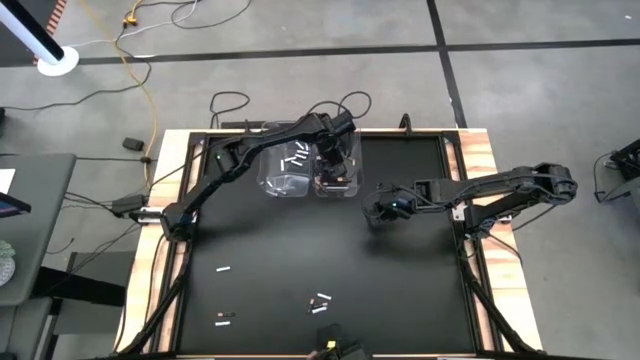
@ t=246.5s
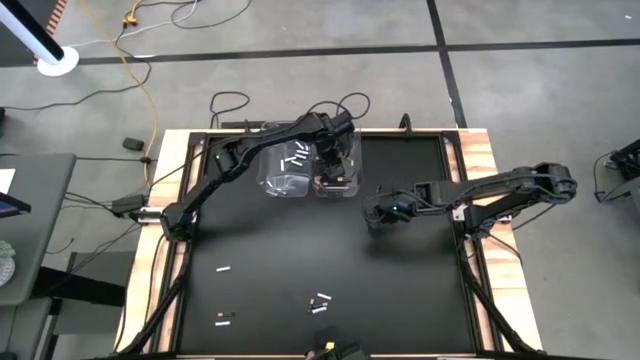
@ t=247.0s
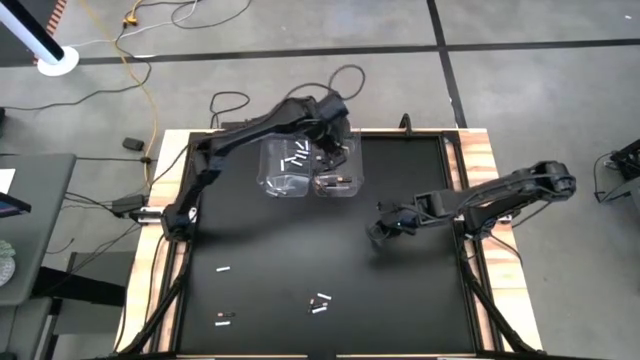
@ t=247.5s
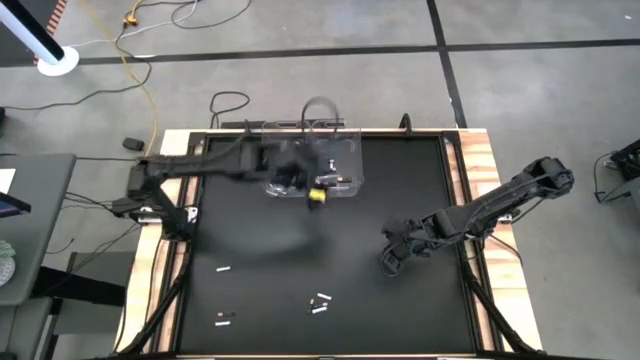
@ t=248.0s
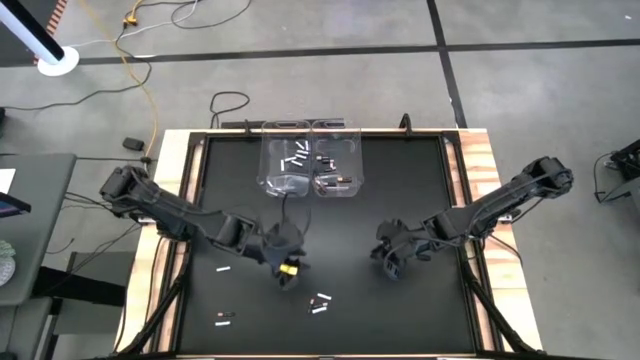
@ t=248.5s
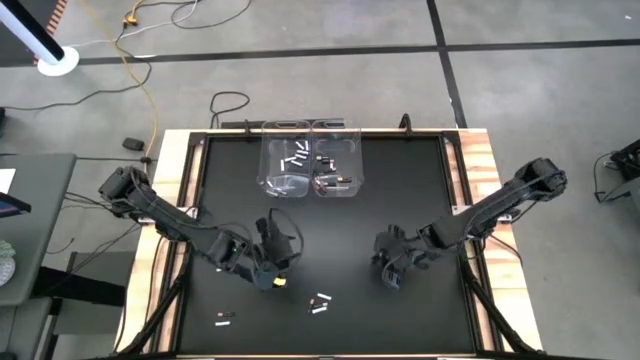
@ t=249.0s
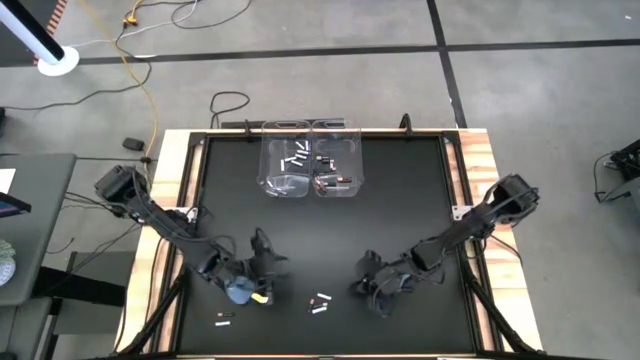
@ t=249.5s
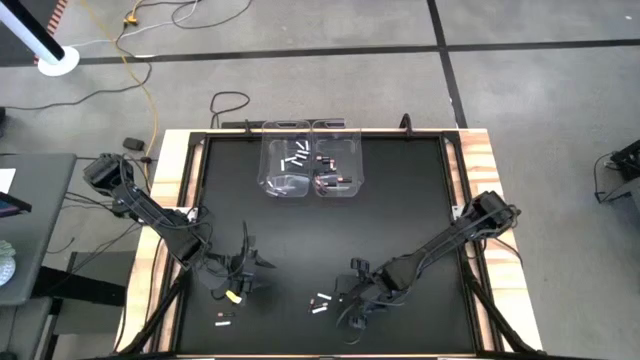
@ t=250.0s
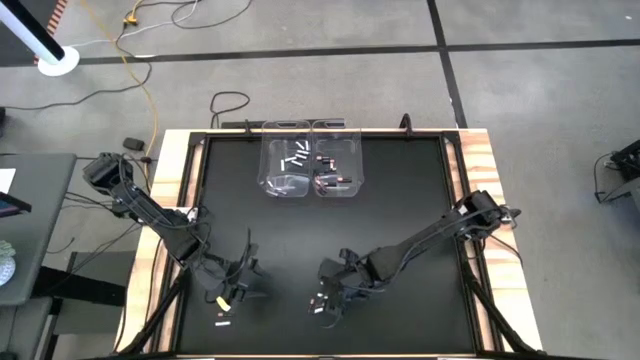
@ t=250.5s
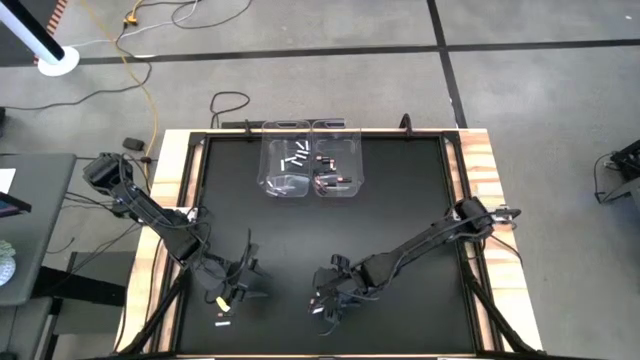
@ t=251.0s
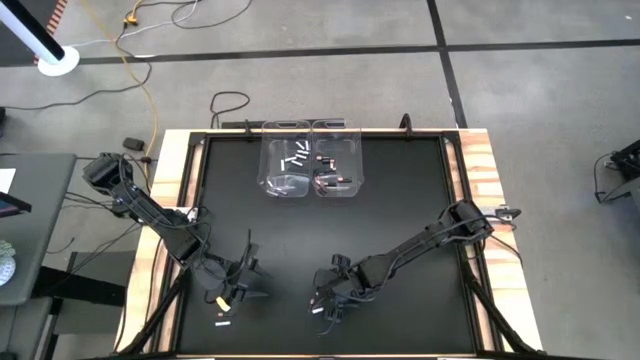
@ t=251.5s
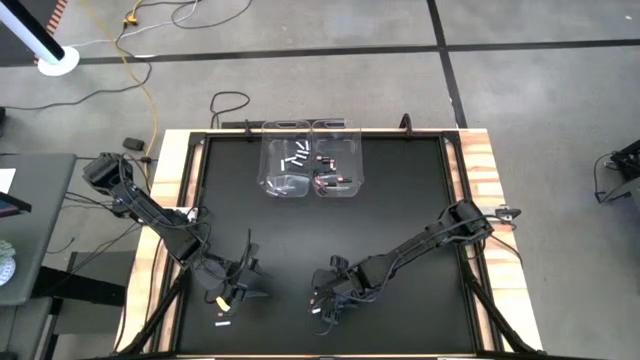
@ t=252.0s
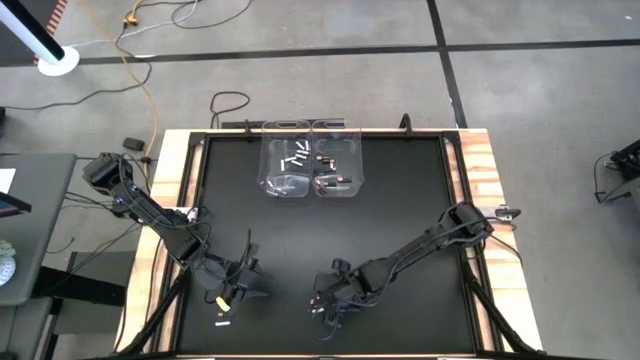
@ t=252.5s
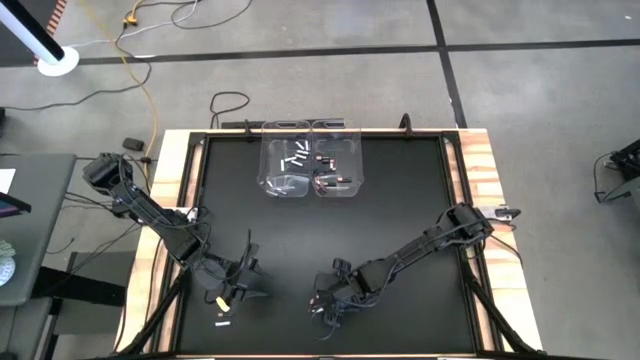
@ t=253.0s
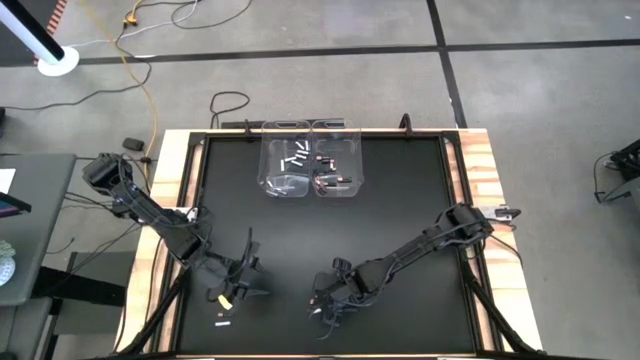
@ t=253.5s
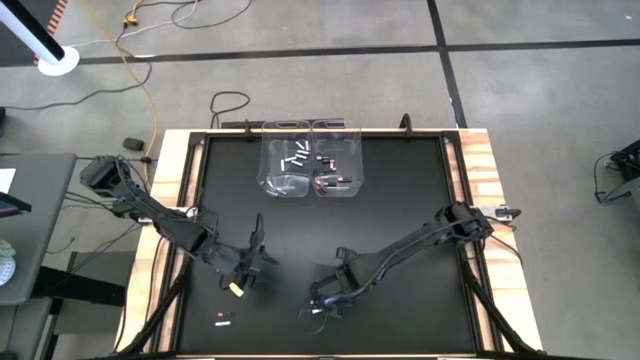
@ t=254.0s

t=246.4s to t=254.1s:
Task: Sort batteries
Put the white battery into the left transparent bin

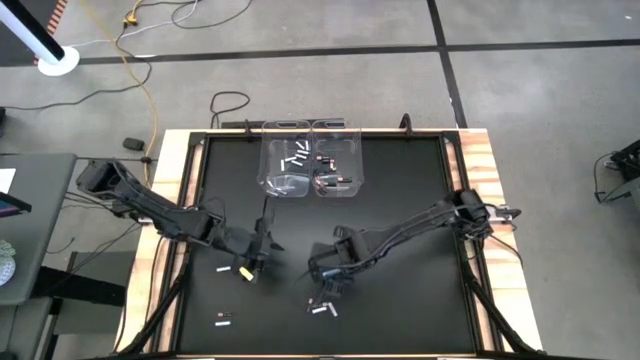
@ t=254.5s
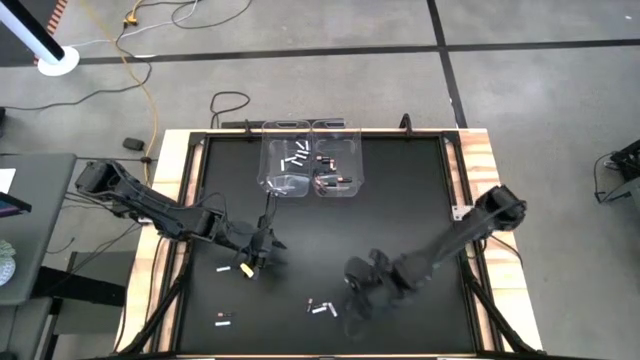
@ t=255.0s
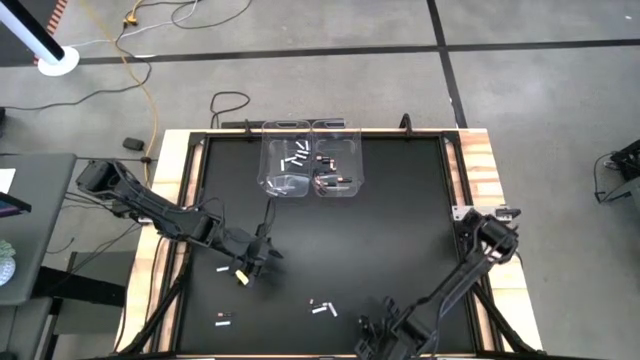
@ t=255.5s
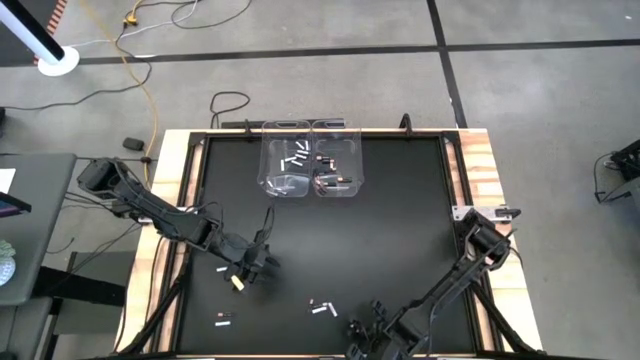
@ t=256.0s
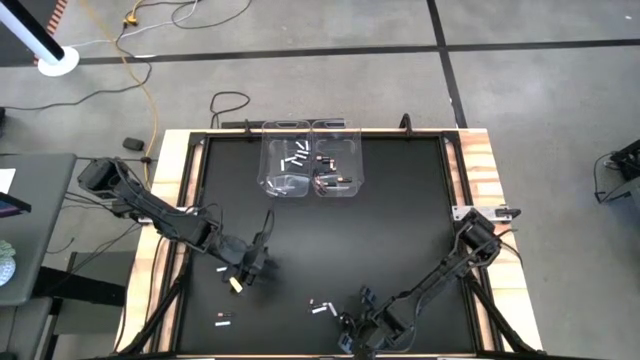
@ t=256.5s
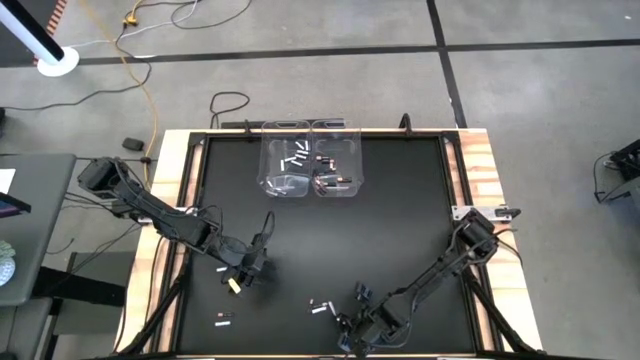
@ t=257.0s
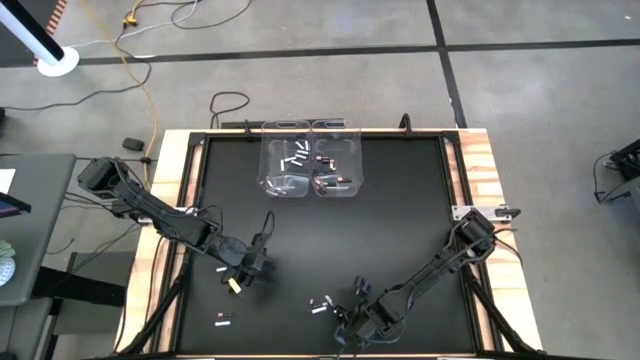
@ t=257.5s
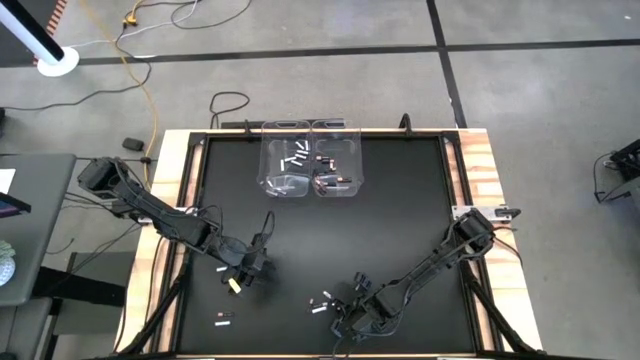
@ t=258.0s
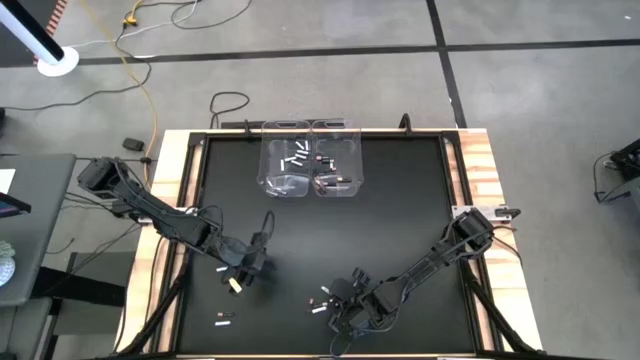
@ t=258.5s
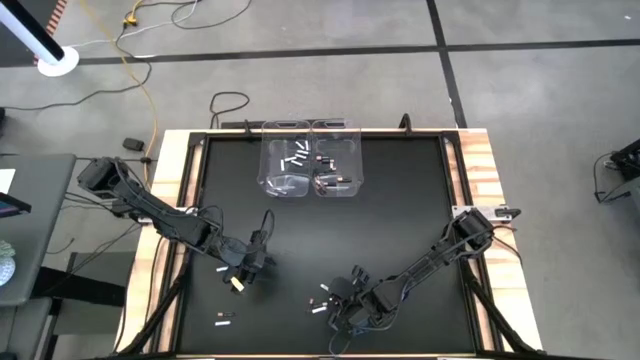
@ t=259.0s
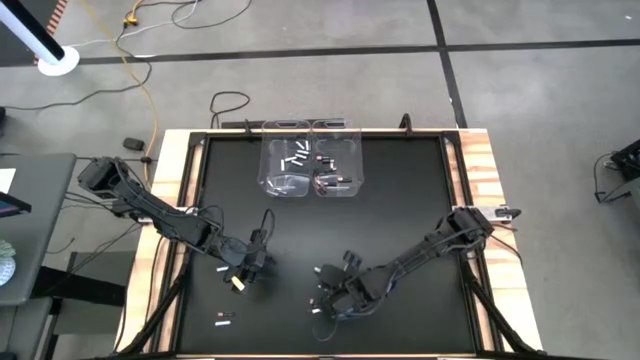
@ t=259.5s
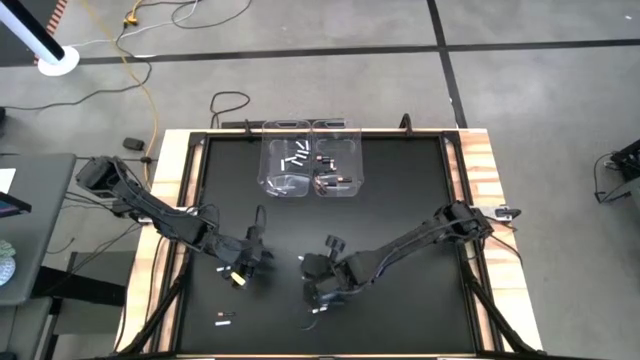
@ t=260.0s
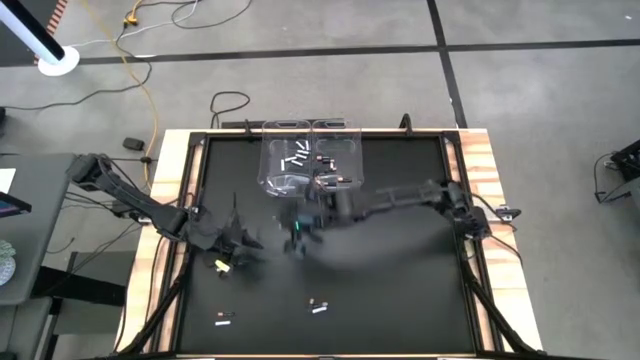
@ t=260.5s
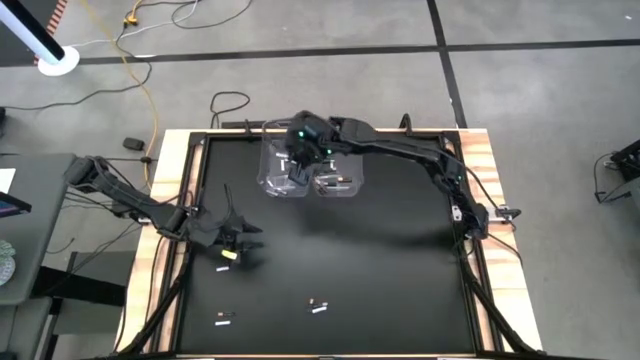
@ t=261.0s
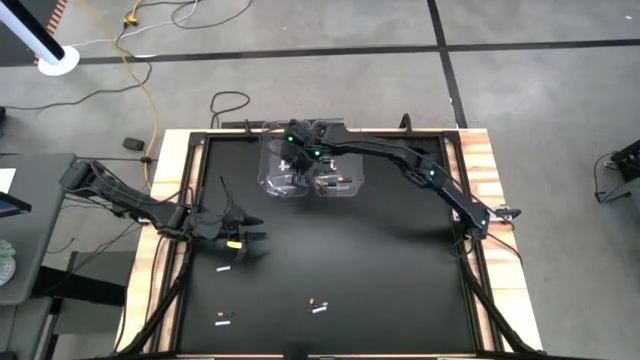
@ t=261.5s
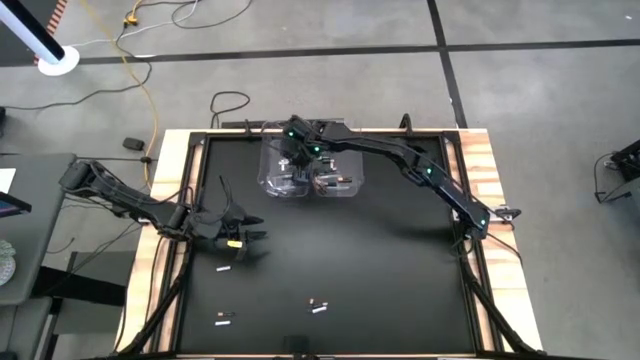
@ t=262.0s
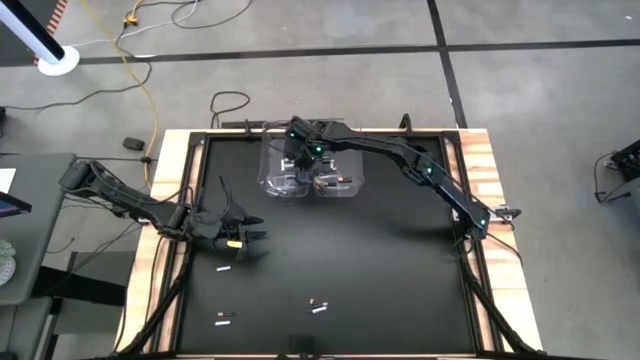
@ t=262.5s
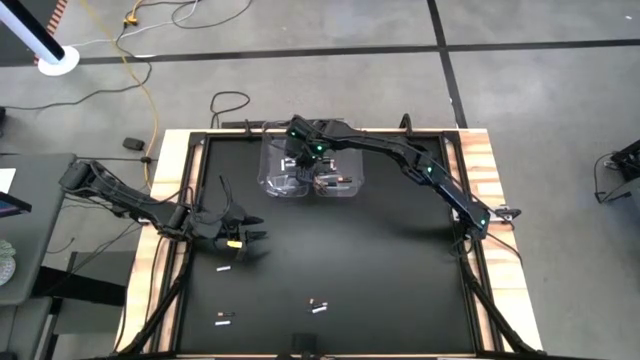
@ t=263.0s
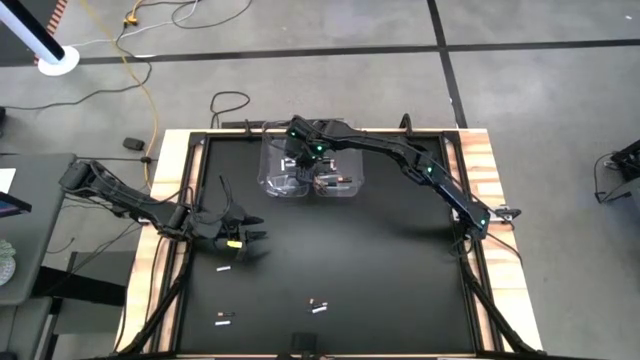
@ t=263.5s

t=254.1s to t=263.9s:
Put the white battery into the left transparent bin

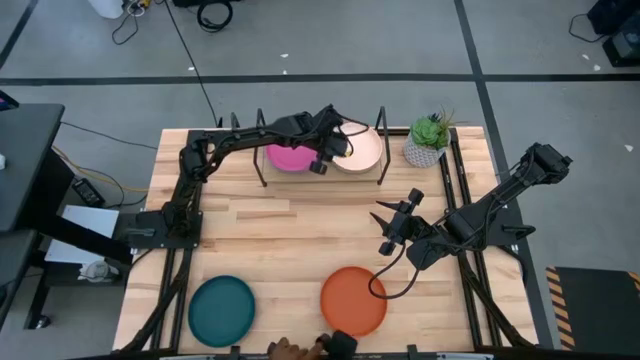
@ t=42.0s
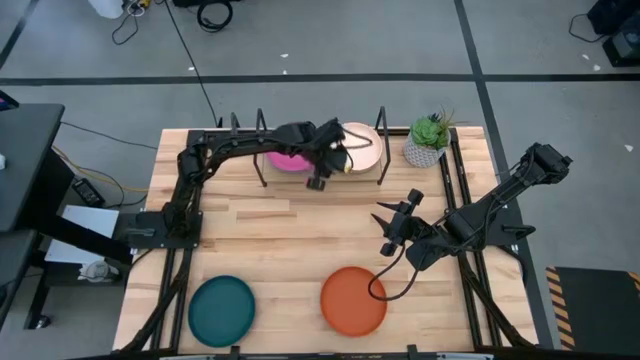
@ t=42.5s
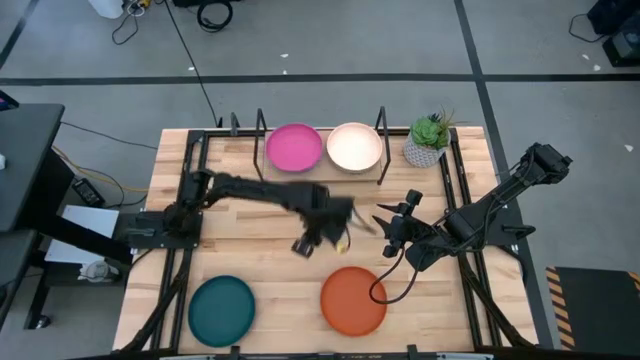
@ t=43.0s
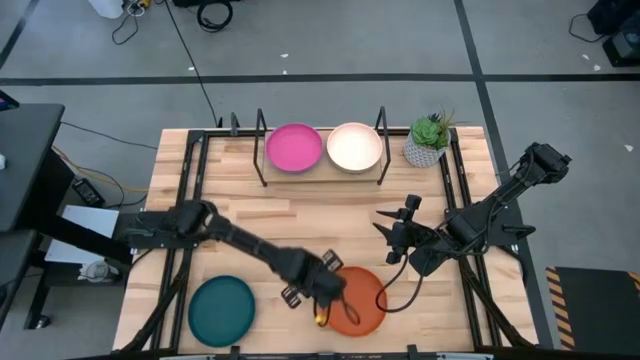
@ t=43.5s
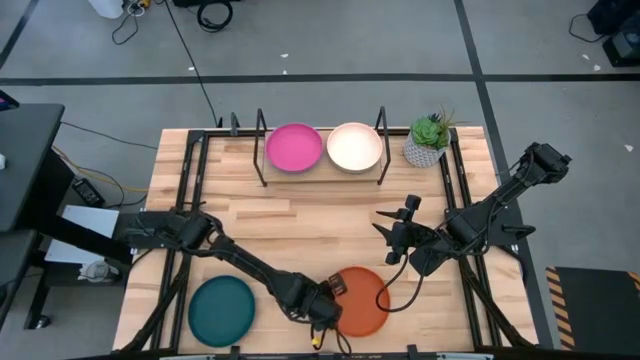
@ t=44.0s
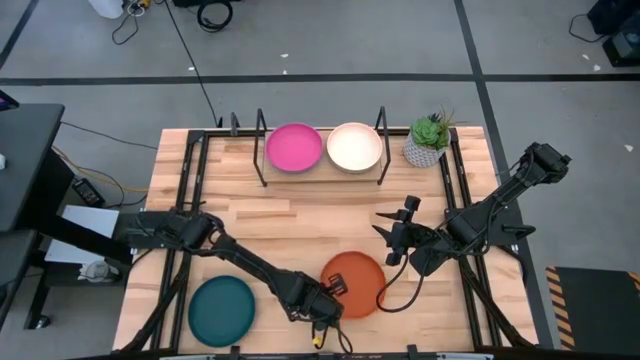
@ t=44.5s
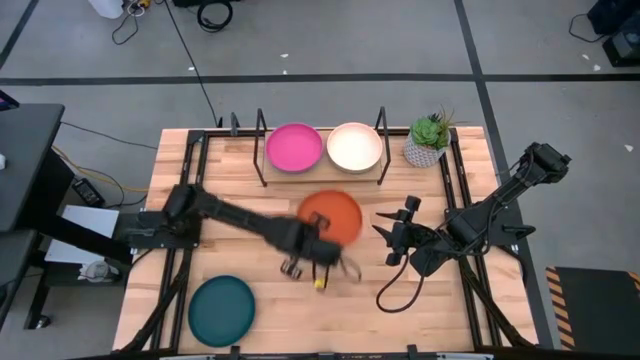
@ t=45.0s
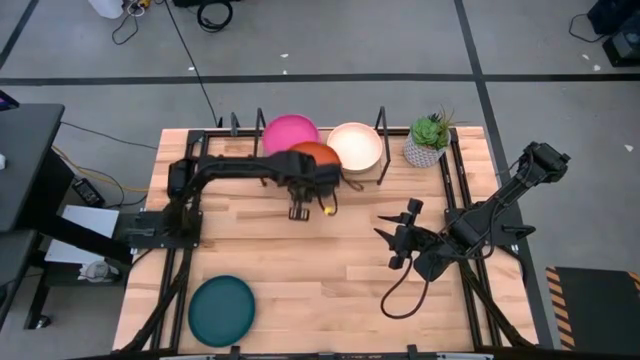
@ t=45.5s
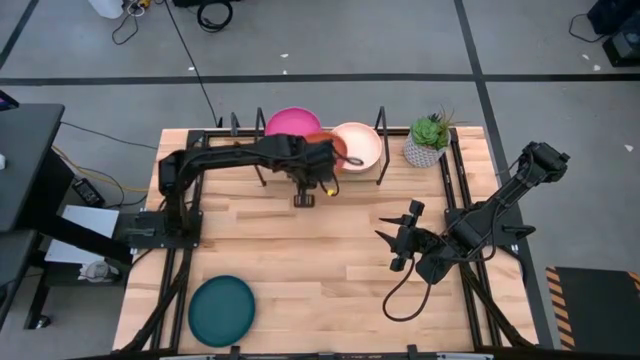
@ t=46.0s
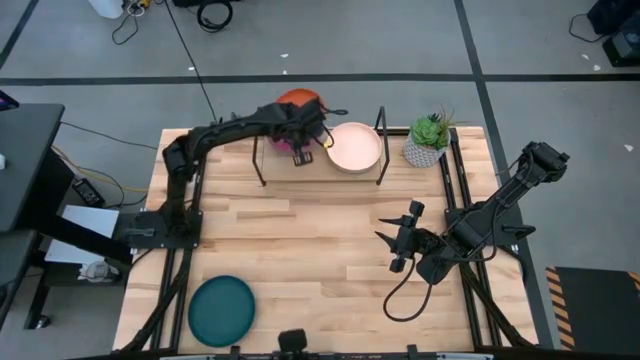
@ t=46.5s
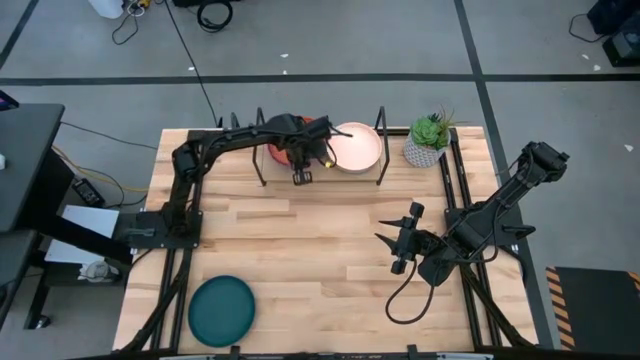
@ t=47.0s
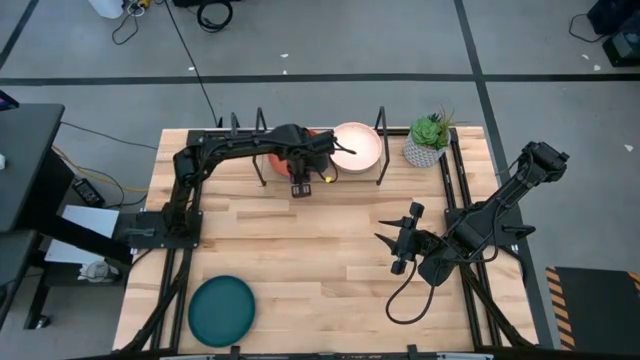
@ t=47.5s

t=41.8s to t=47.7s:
Task: Place and stack plates onto a shelf
Stack the orange plate on top of the pink plate on the shelf
